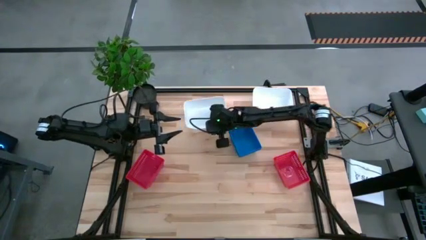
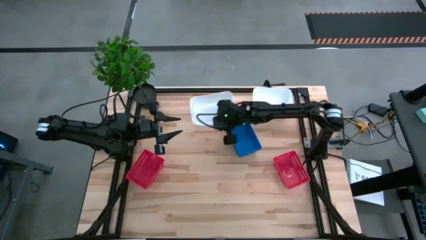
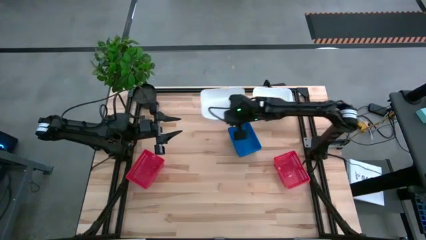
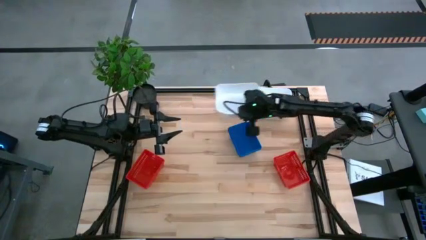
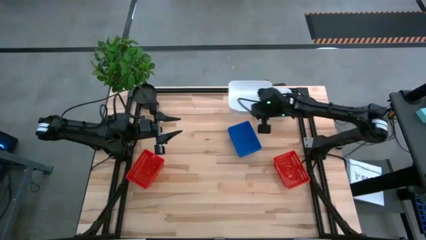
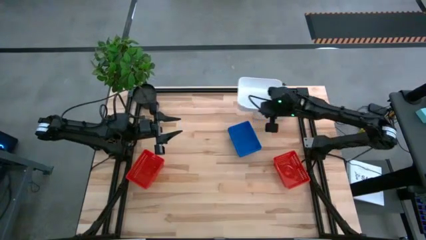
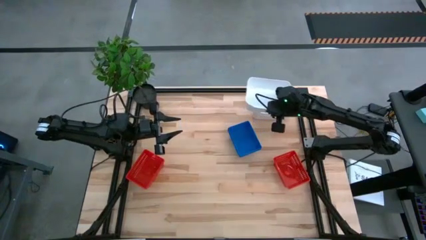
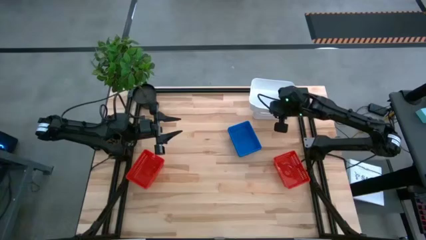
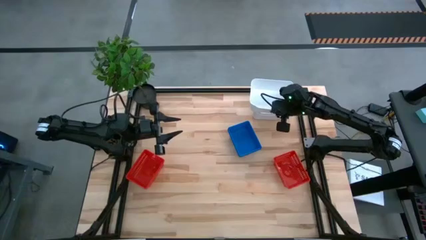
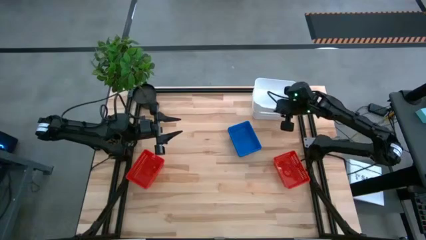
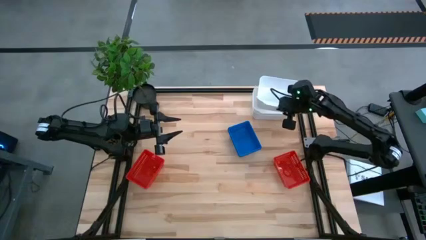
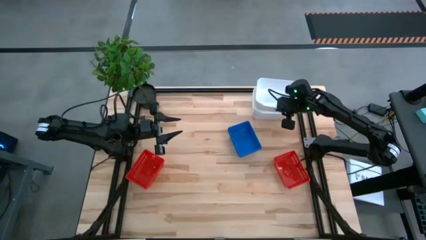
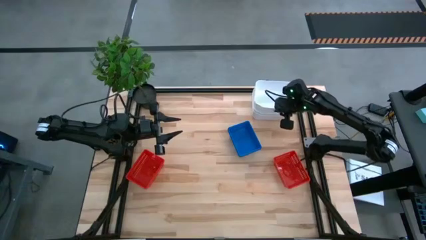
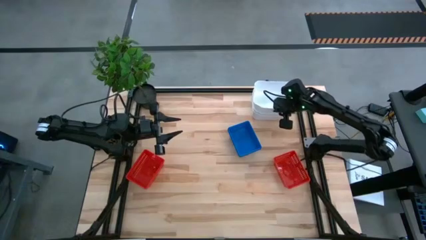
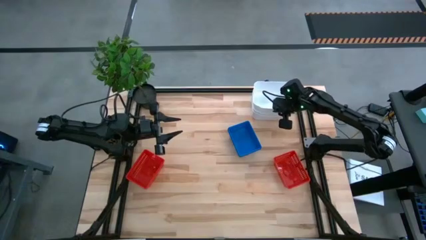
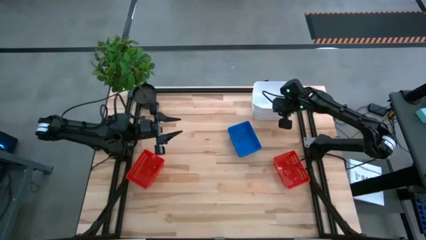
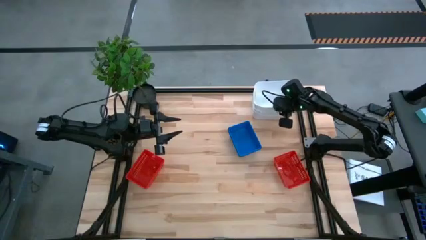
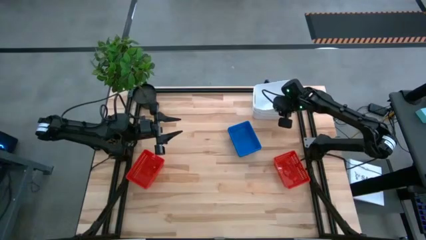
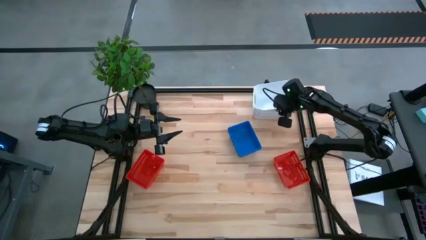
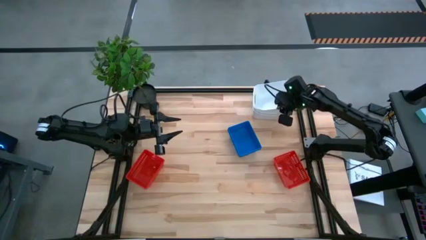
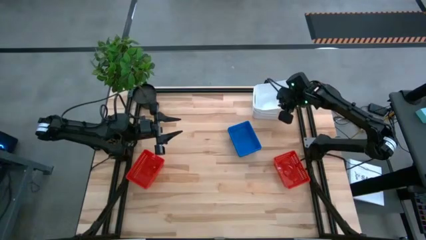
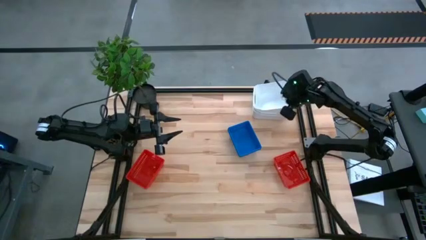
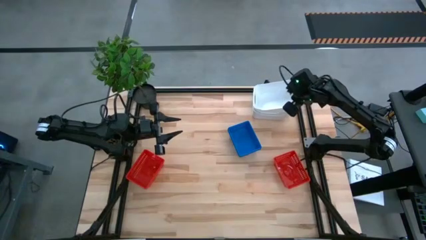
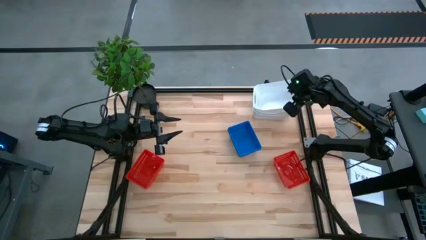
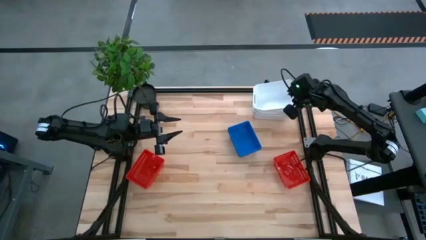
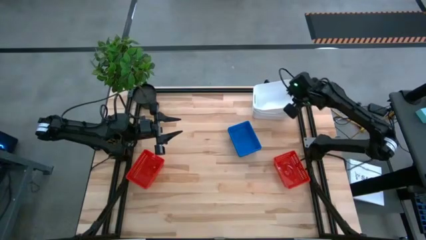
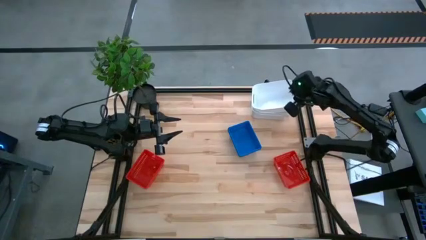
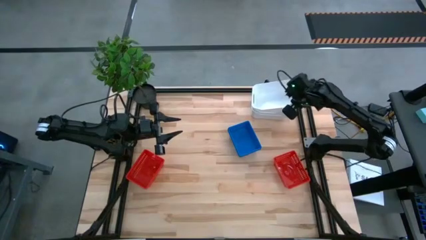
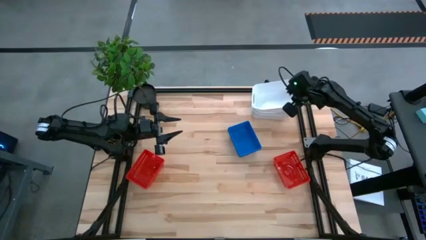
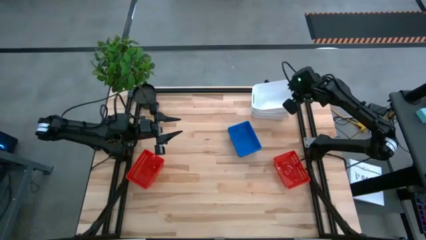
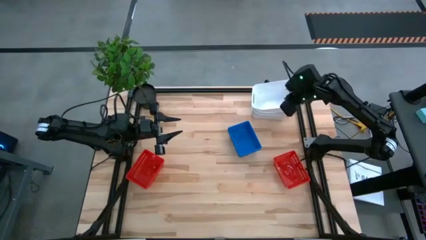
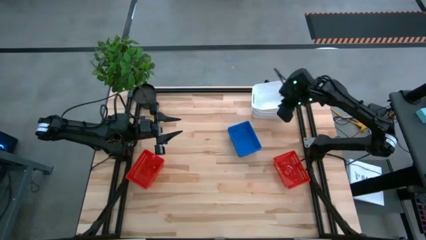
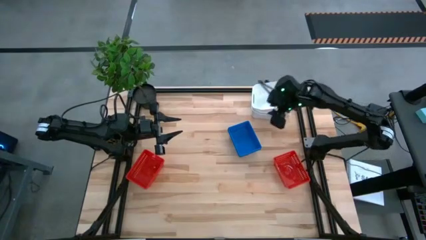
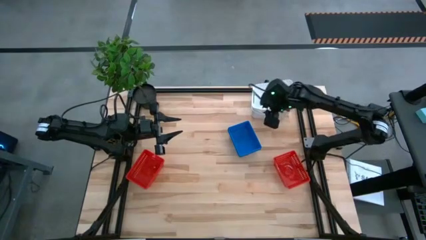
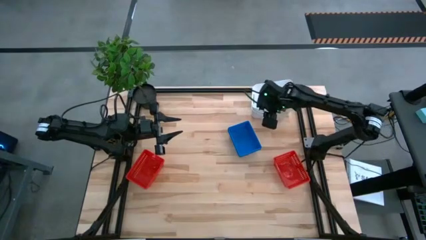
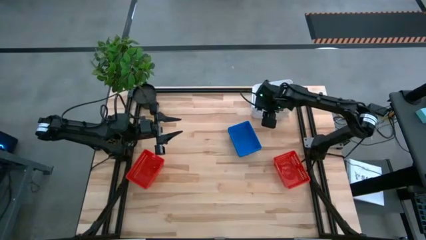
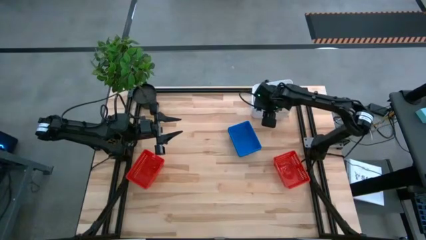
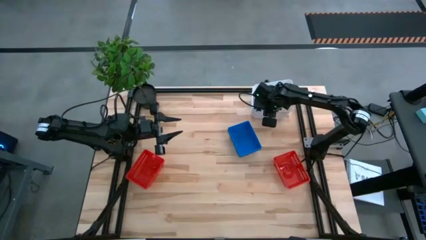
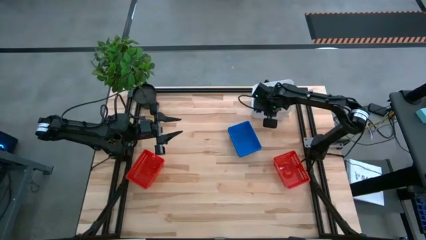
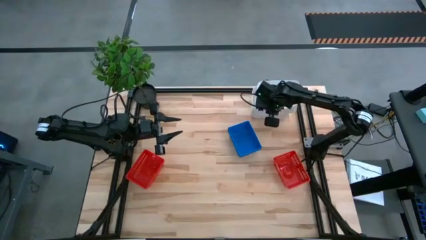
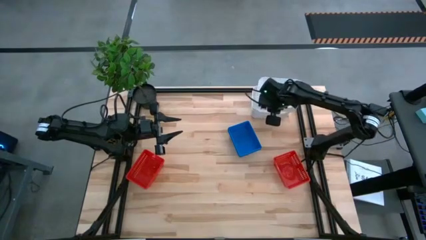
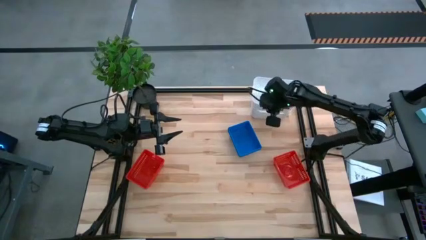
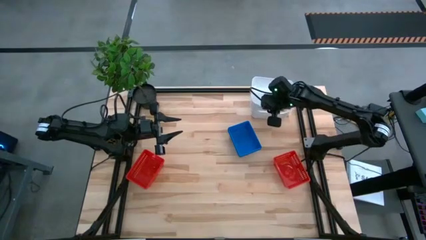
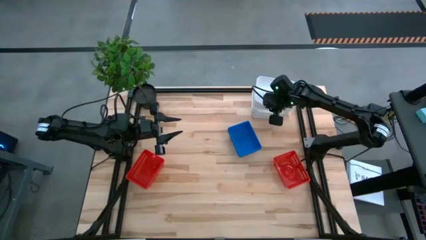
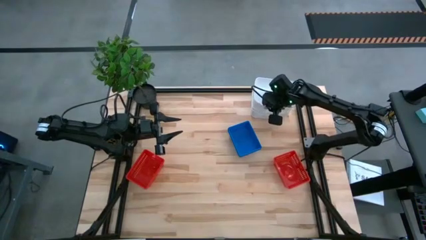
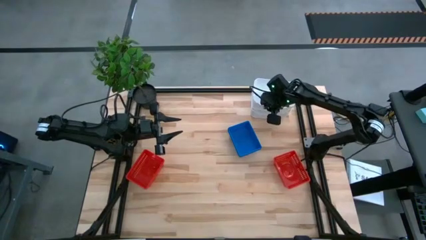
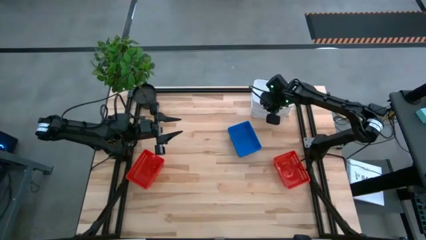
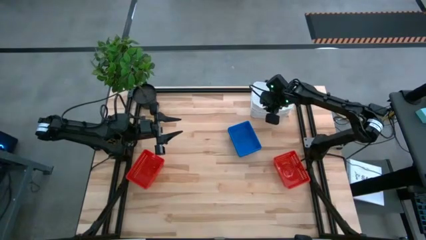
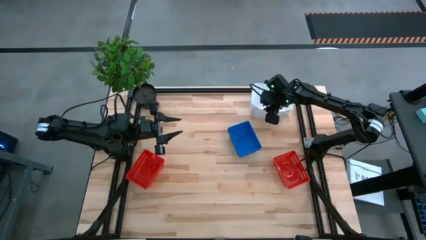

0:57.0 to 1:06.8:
Stack the left white bin on the stacked white bin
